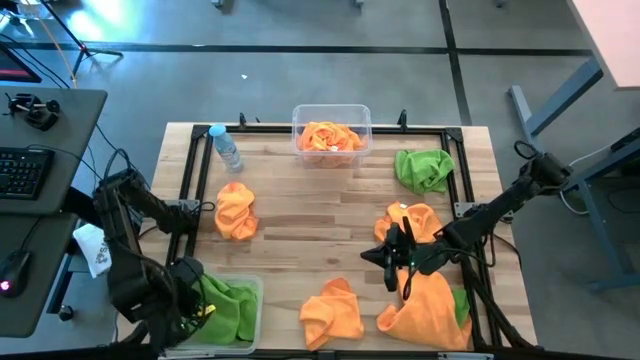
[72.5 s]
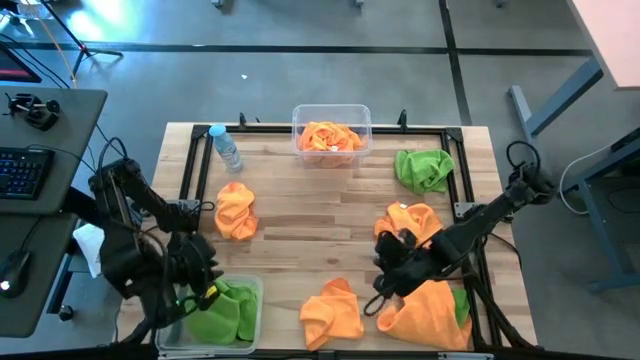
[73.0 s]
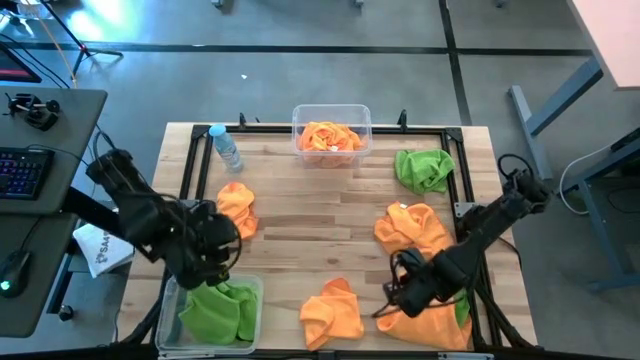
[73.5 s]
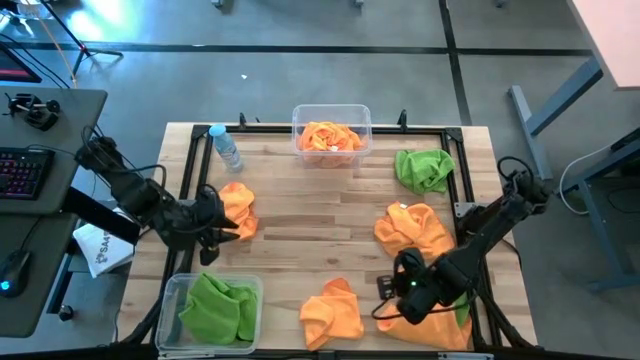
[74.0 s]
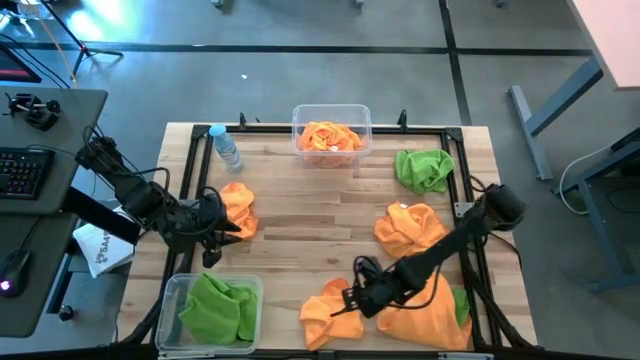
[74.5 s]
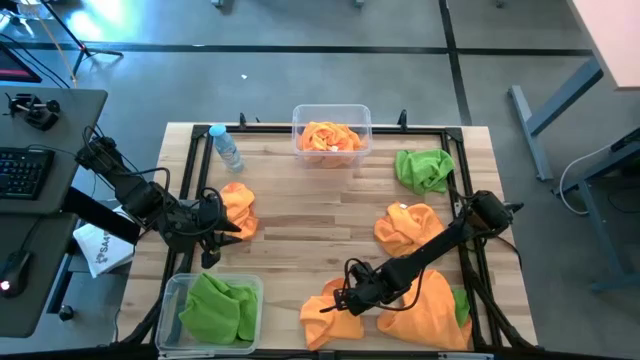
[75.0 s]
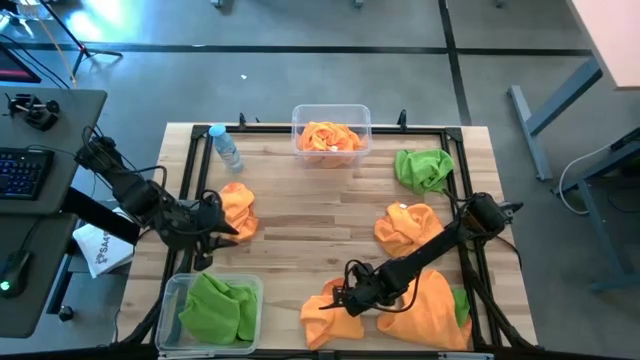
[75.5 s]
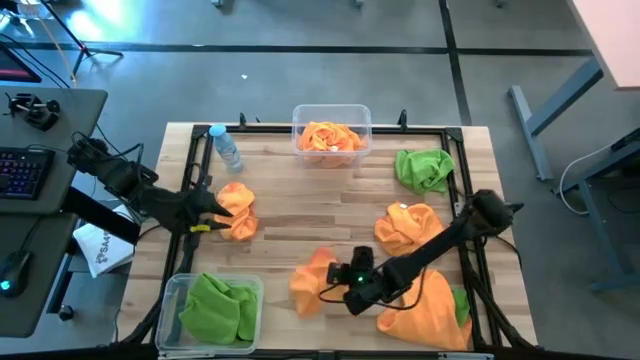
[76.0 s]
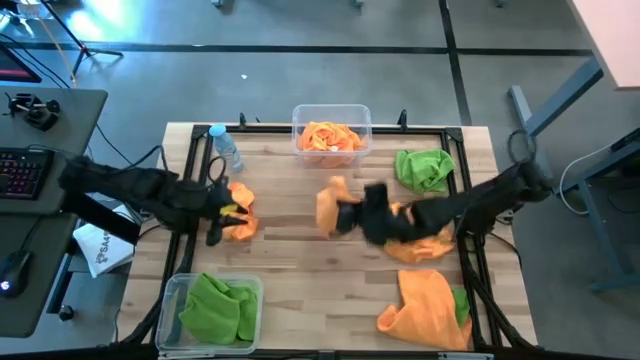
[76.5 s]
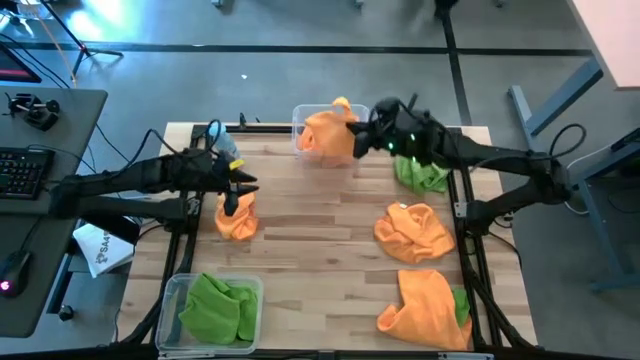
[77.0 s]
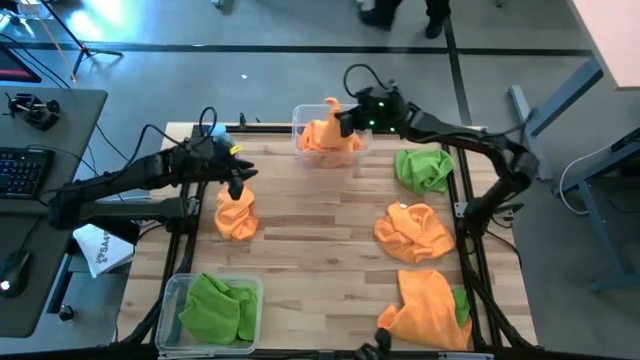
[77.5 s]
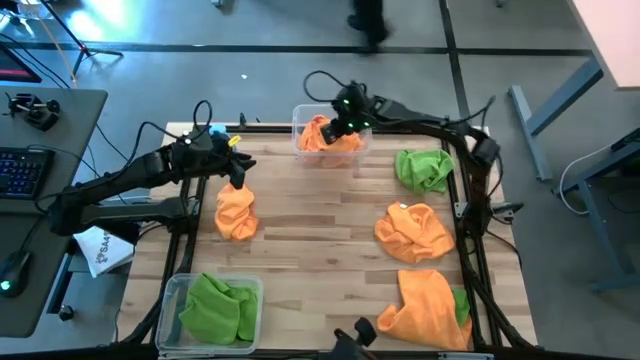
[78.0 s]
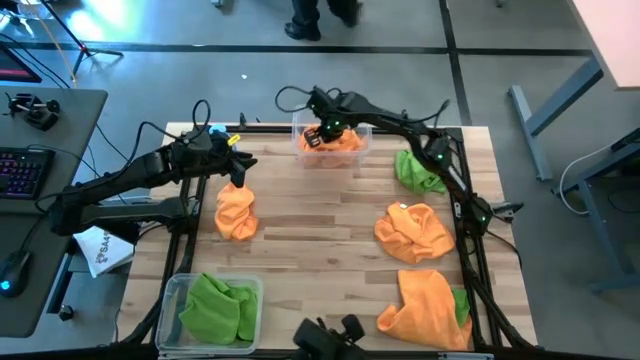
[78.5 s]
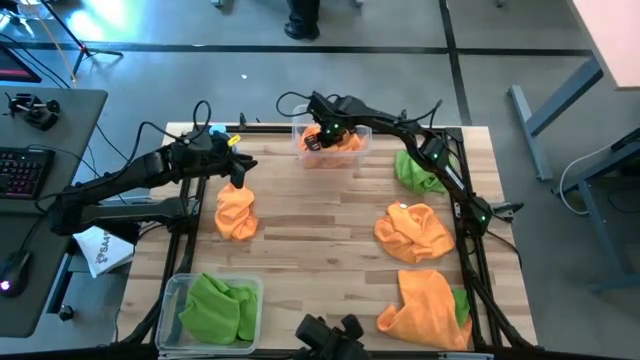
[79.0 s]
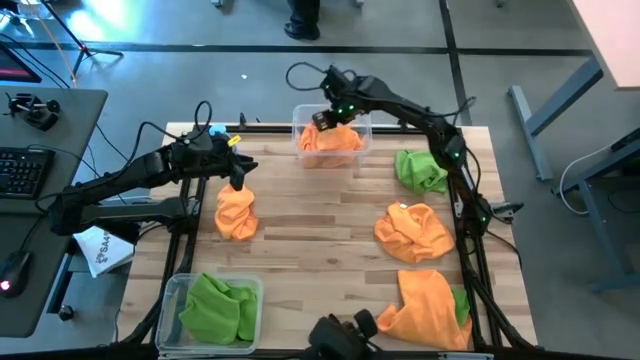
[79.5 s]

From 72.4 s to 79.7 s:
Task: Sort microfiber towel by color & place in baskets
Put the orange towel into the top transparent bin

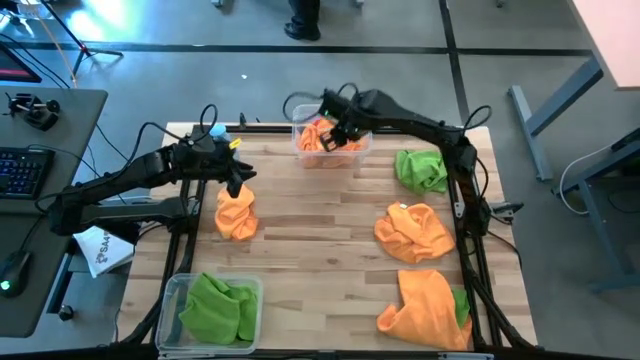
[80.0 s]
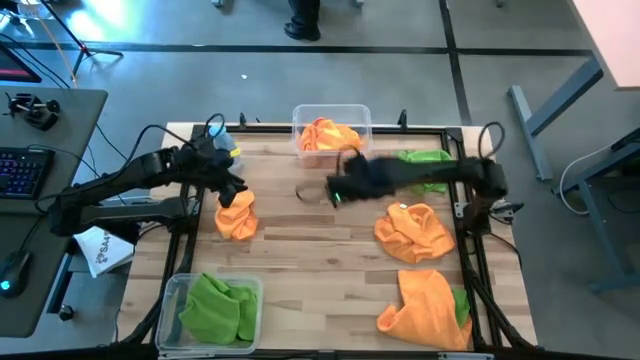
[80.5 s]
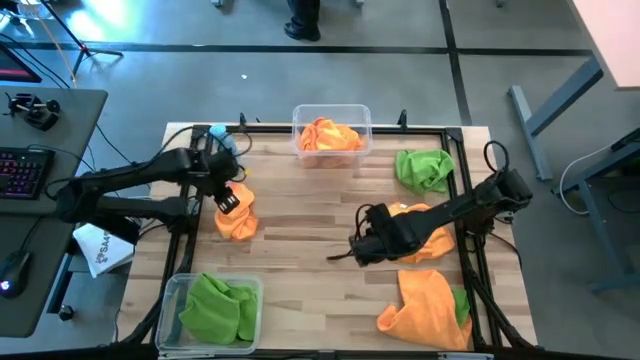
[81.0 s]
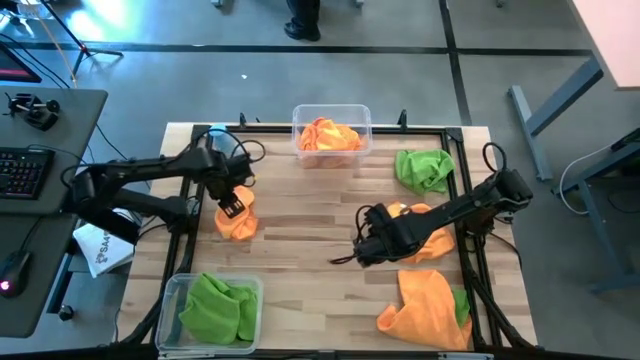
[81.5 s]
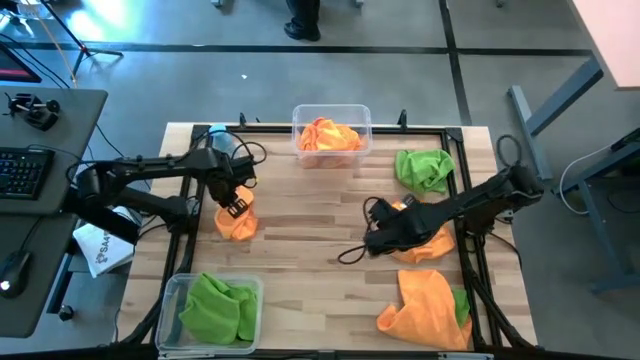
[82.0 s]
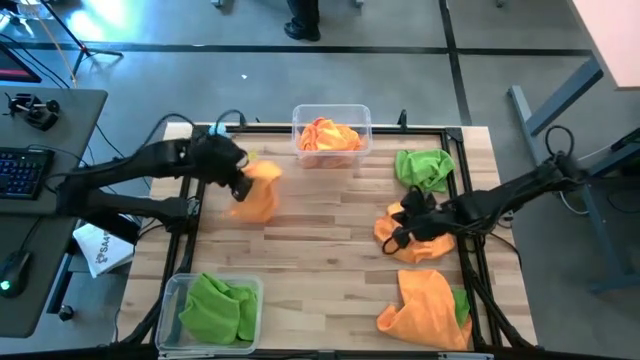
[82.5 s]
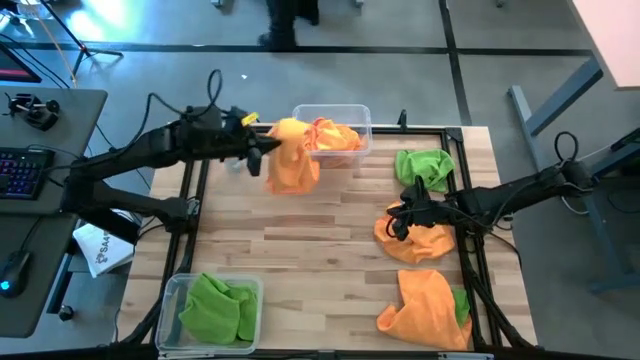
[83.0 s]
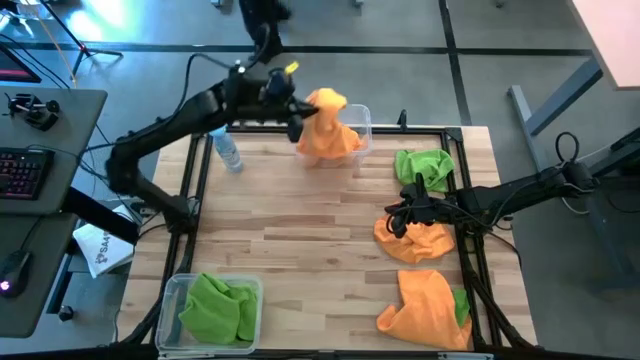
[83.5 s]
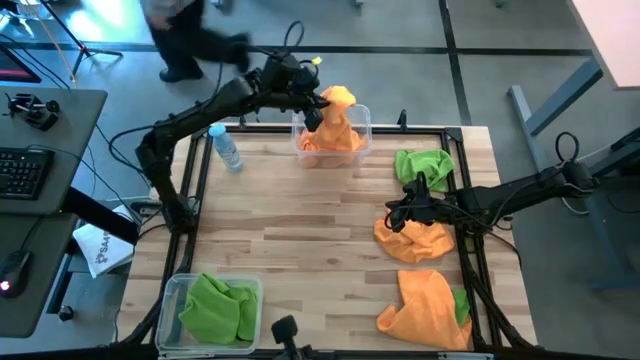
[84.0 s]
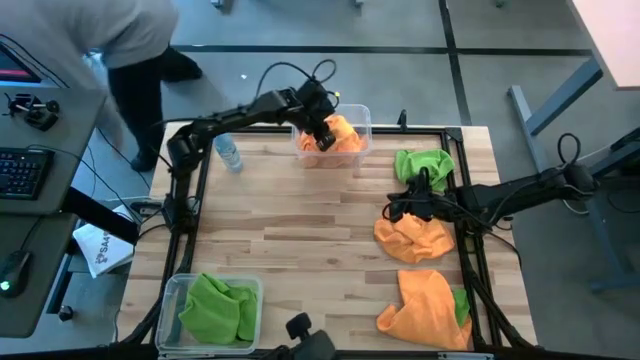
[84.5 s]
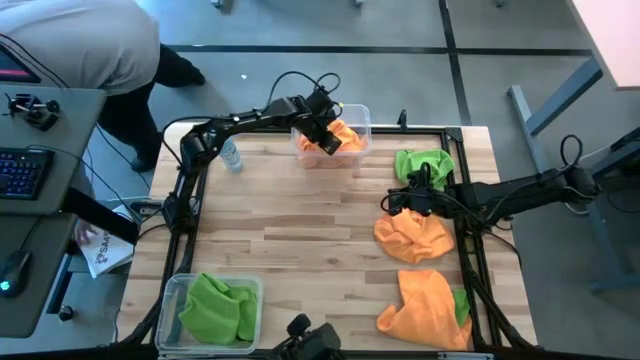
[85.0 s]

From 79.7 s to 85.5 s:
Put the orange towel into the top transparent bin

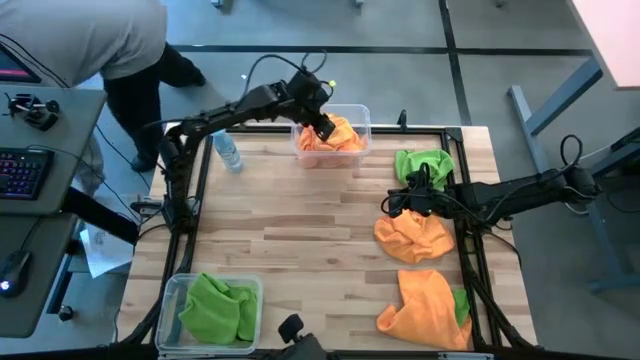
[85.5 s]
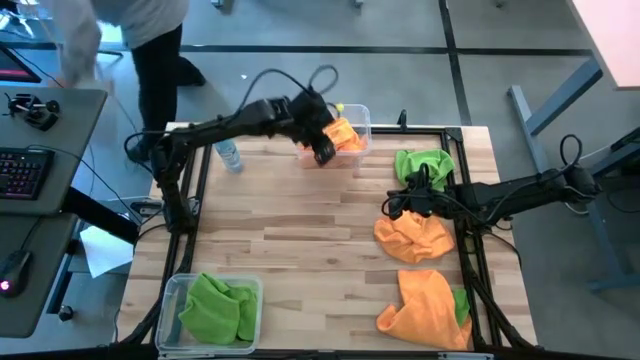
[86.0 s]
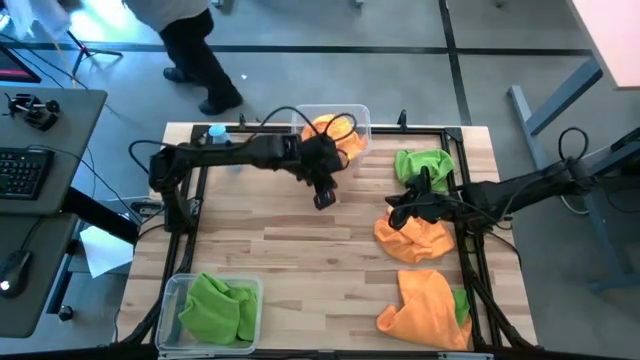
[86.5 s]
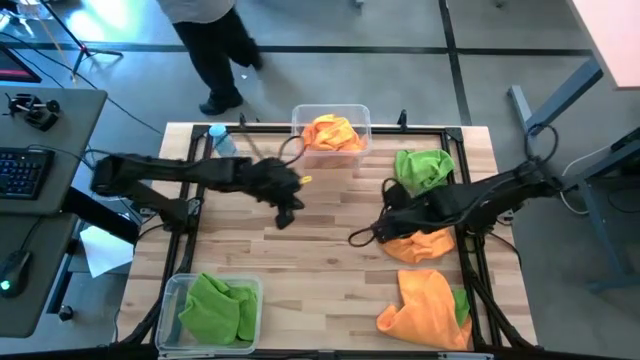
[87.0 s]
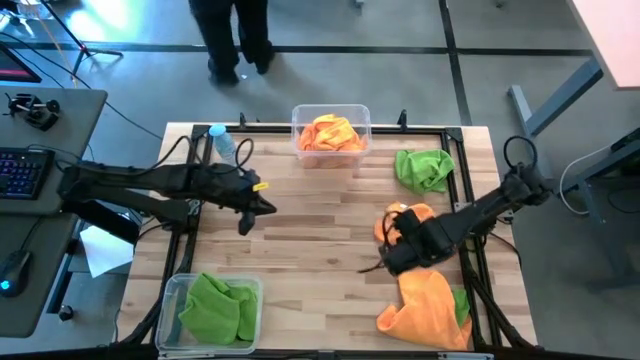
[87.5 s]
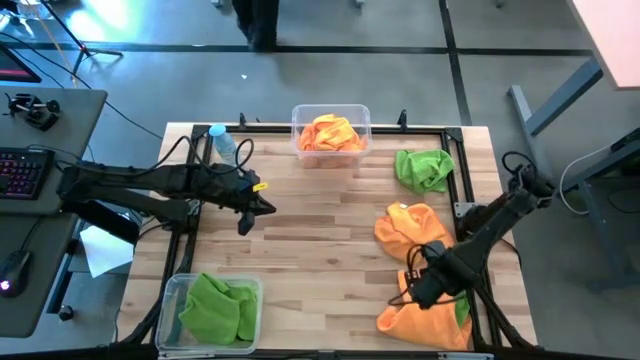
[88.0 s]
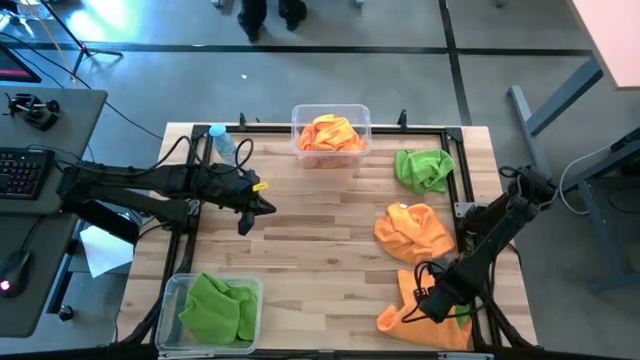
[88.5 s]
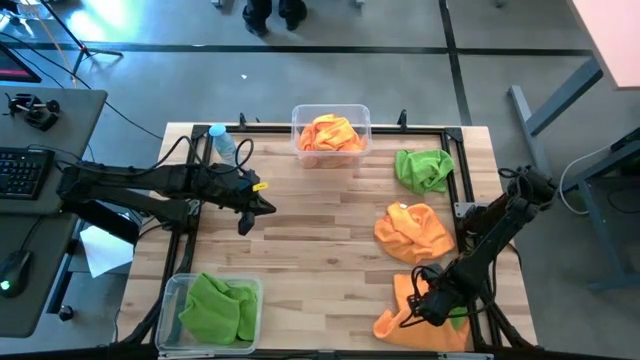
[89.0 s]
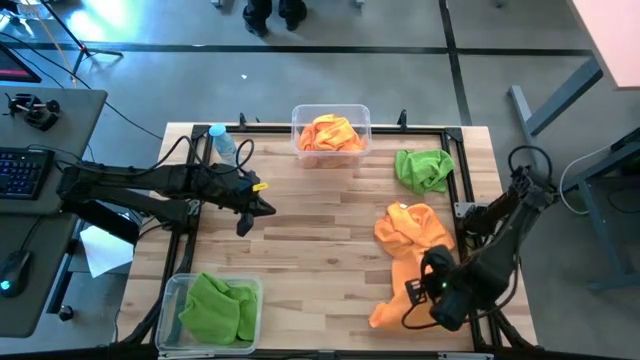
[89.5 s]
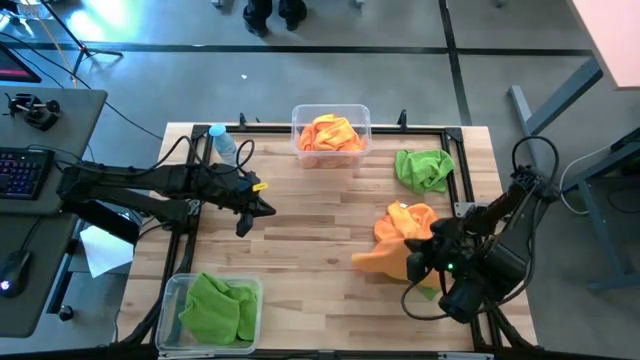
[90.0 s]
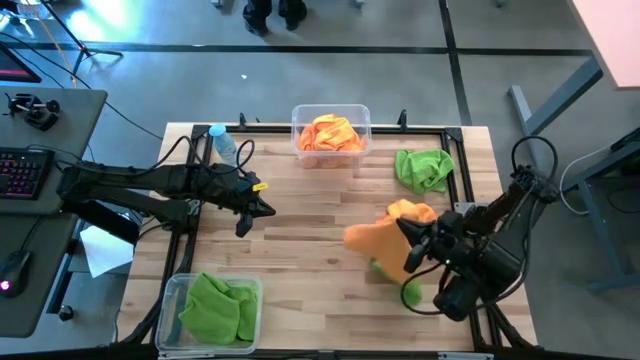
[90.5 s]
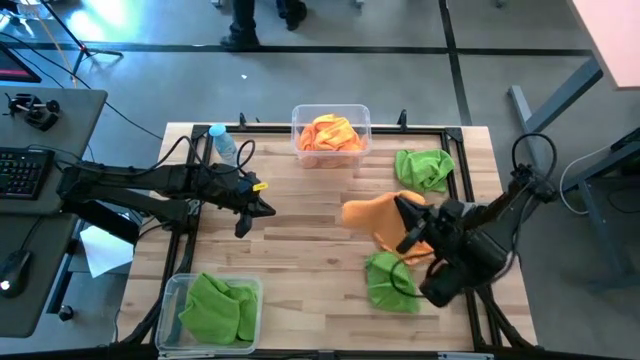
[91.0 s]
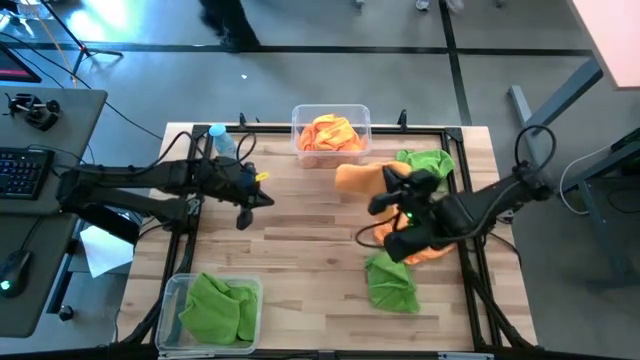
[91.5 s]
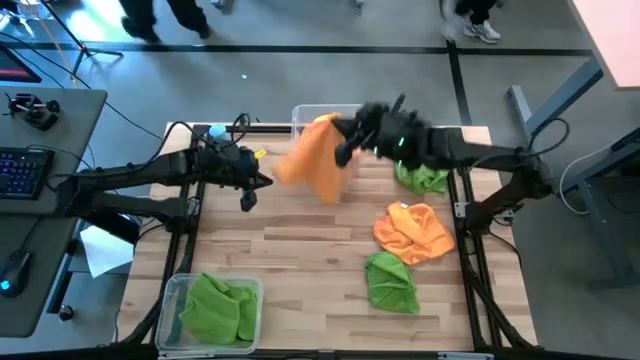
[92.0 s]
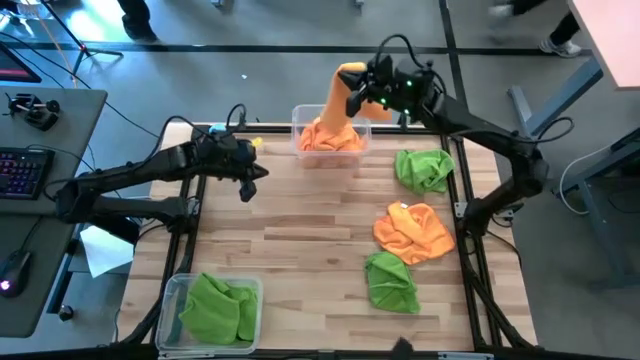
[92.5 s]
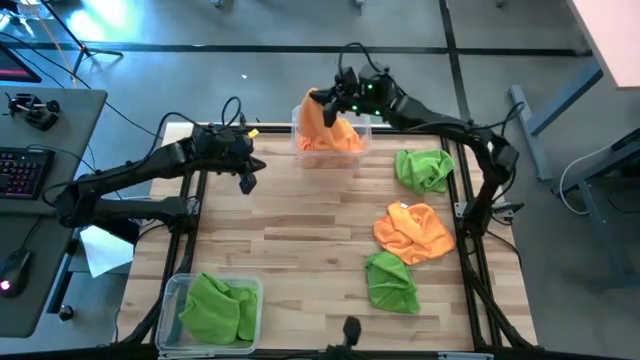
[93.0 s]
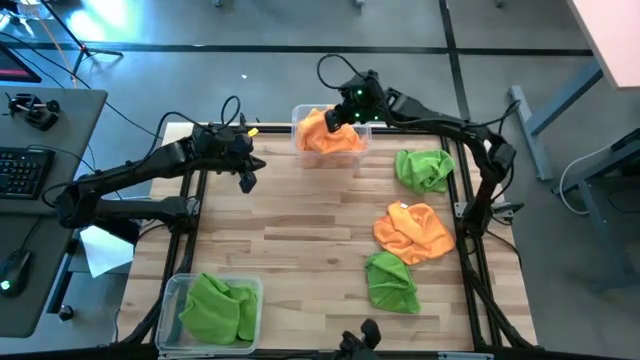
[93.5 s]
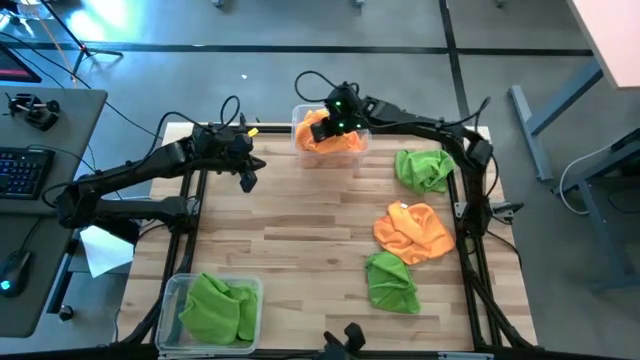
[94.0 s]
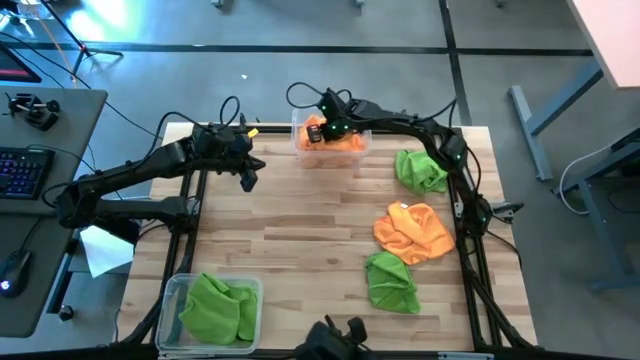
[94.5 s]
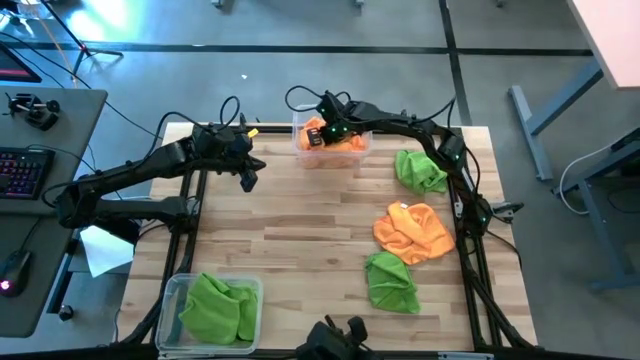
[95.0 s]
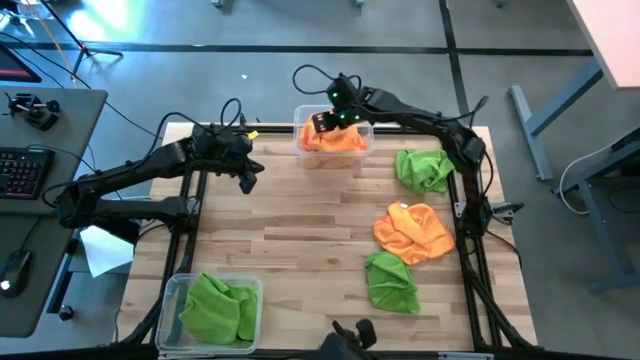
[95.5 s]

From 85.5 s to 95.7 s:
Put the orange towel into the top transparent bin
